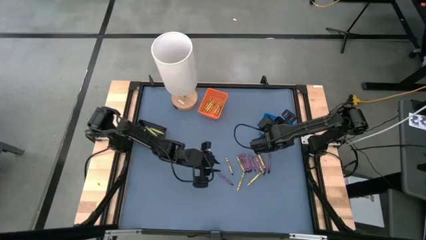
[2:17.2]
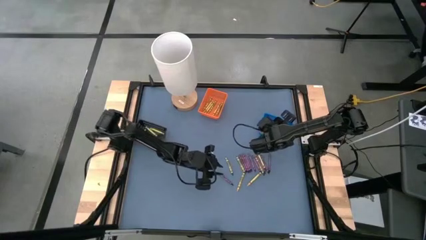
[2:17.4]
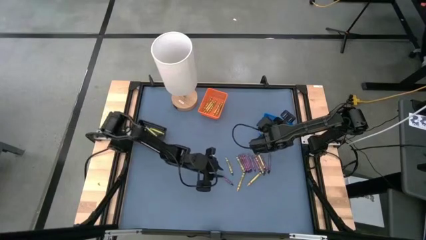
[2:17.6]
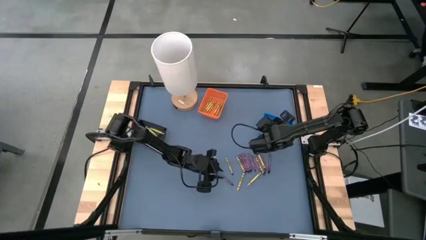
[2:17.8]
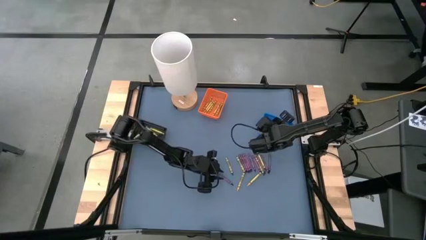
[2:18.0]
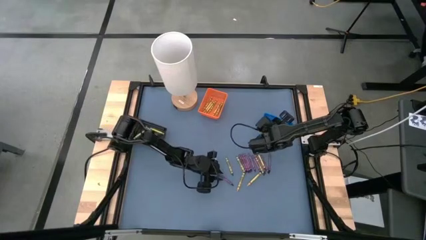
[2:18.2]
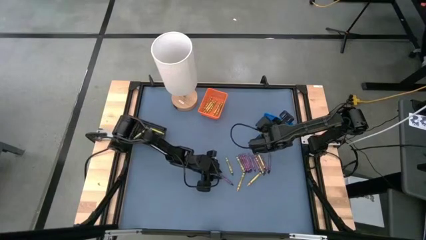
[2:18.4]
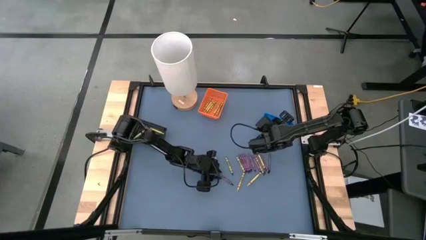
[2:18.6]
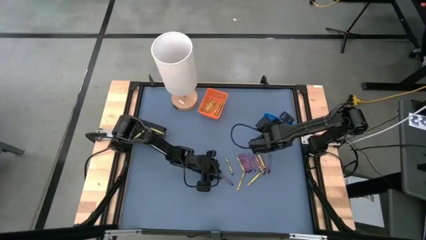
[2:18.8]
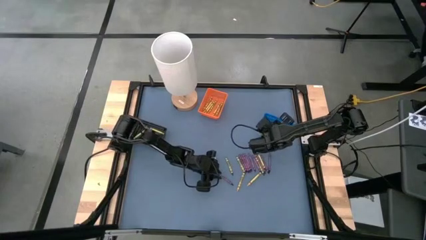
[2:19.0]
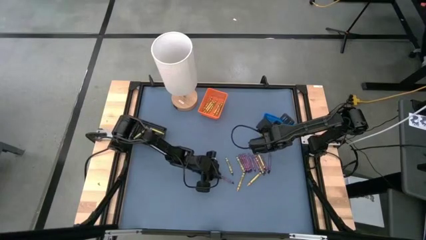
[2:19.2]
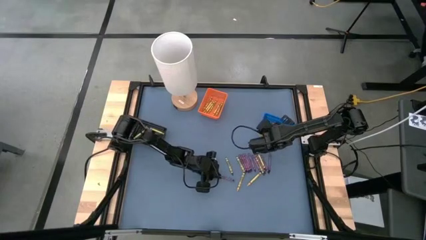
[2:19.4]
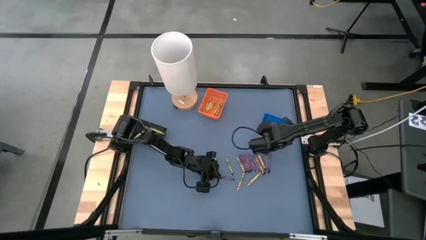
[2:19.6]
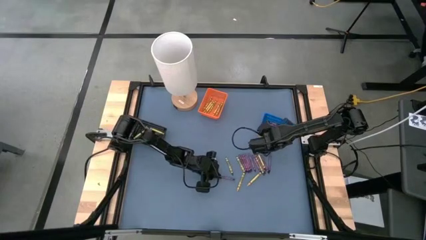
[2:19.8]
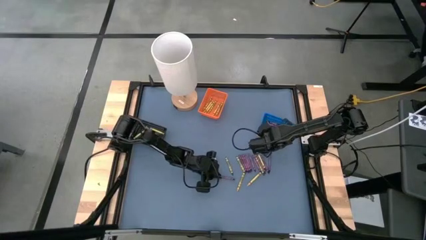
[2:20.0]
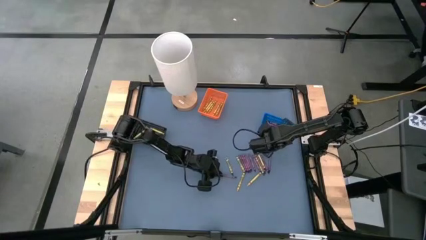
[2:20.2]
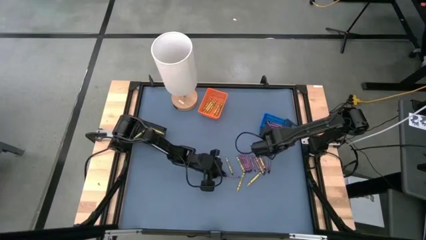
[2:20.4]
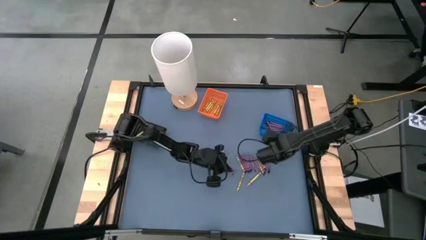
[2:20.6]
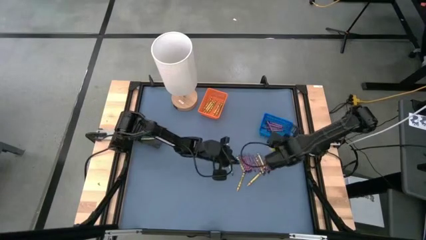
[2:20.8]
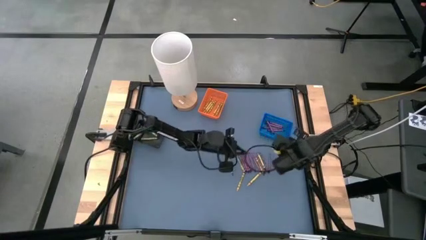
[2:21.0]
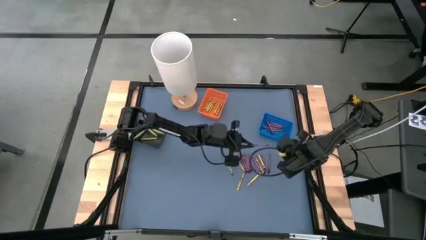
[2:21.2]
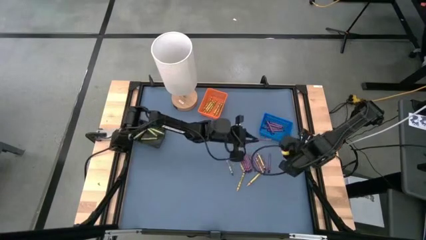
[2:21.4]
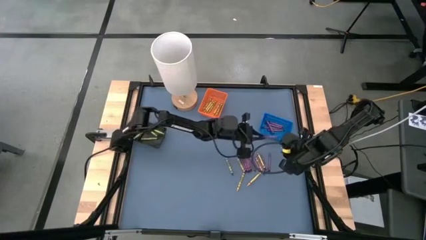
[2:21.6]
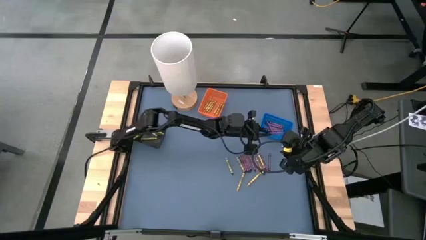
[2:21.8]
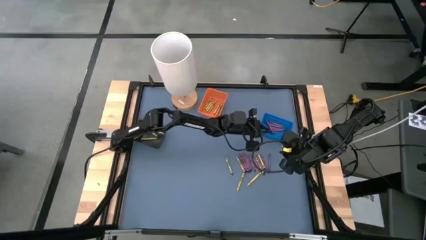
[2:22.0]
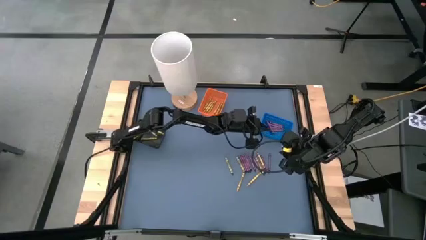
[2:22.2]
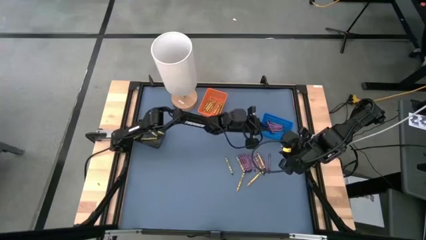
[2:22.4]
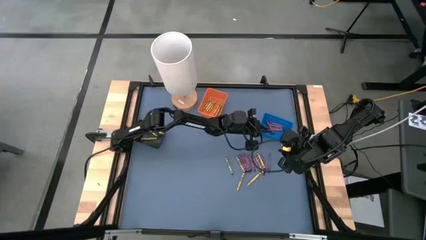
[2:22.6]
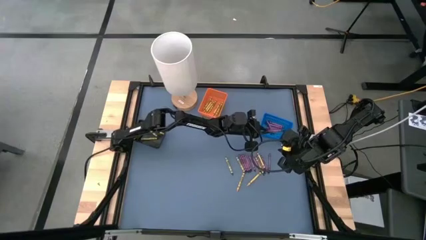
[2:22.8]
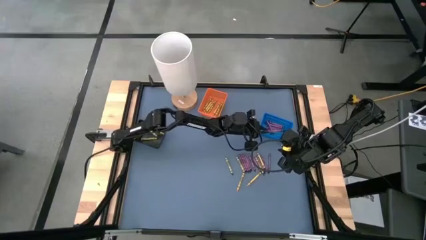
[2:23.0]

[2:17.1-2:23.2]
Task: Sort crayons
Put the violet crayon into the blue basket

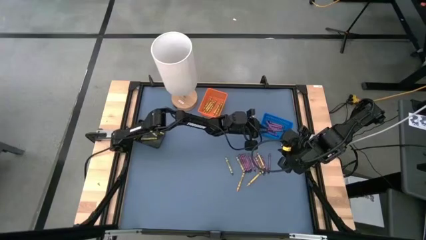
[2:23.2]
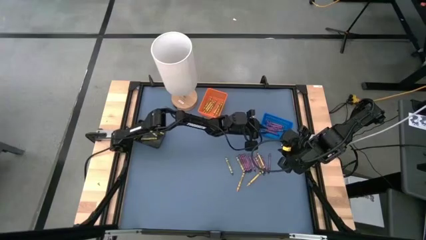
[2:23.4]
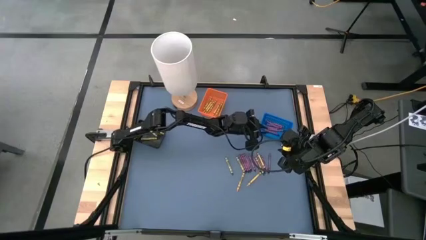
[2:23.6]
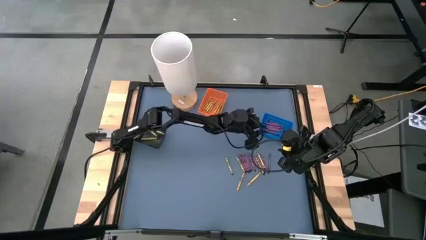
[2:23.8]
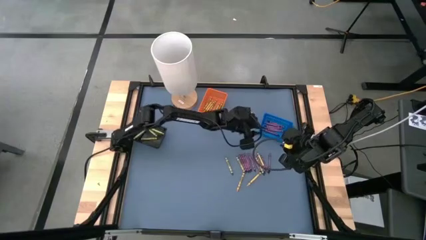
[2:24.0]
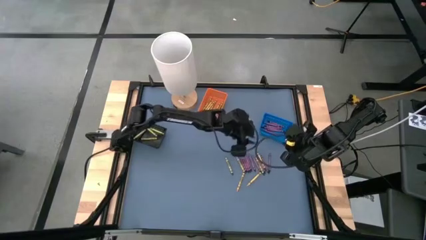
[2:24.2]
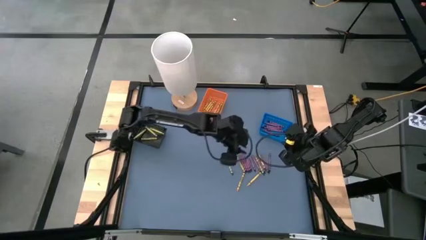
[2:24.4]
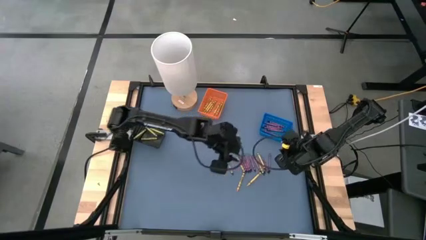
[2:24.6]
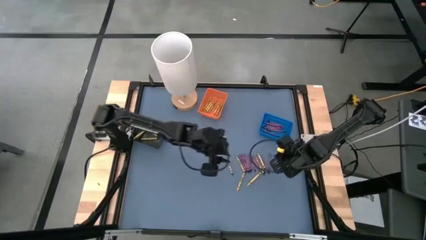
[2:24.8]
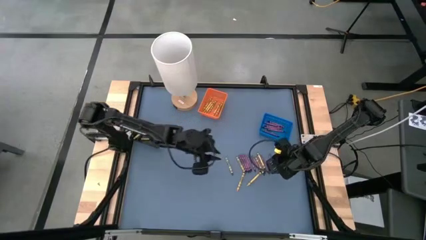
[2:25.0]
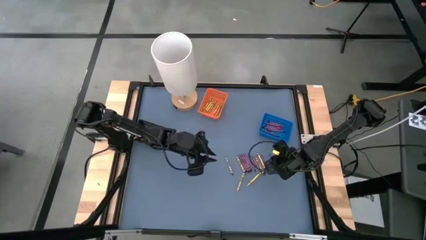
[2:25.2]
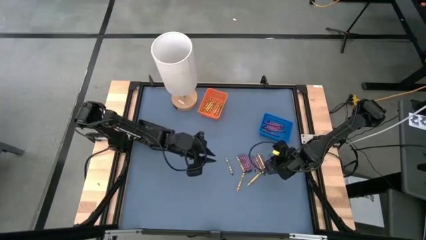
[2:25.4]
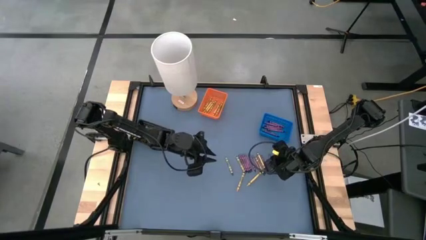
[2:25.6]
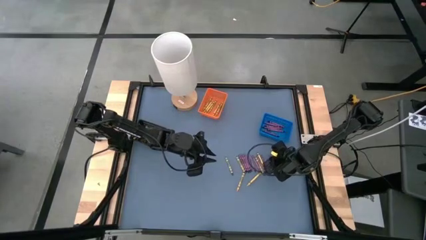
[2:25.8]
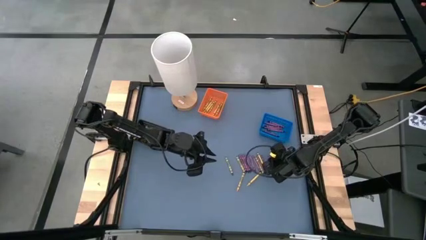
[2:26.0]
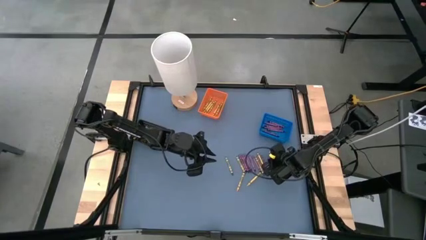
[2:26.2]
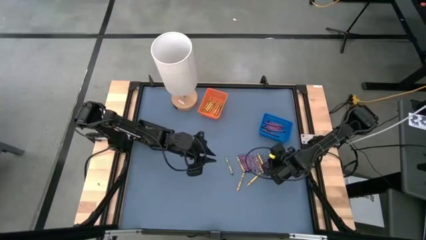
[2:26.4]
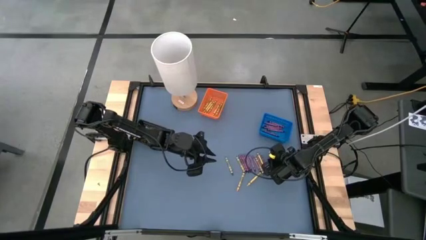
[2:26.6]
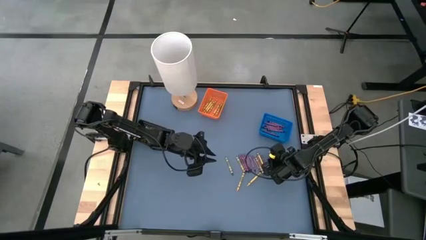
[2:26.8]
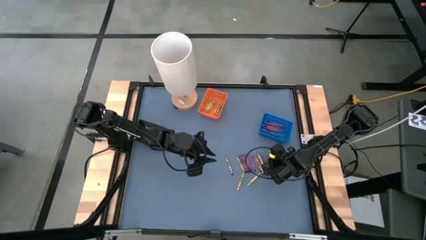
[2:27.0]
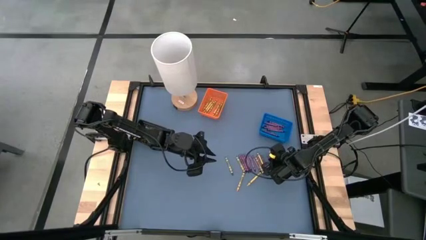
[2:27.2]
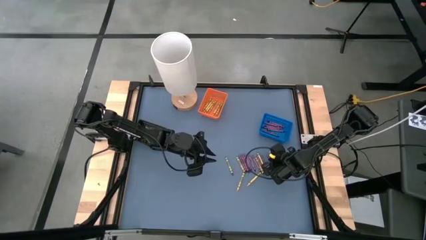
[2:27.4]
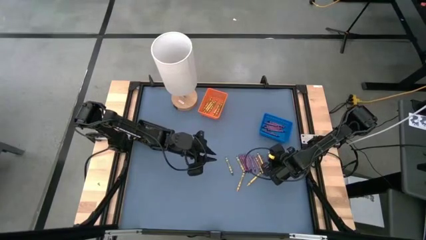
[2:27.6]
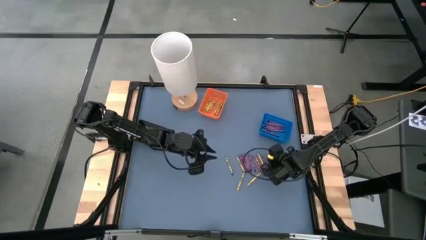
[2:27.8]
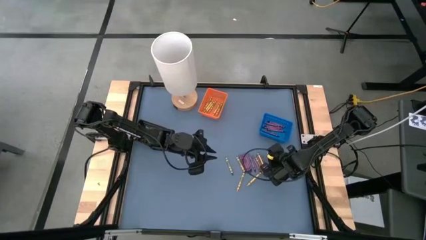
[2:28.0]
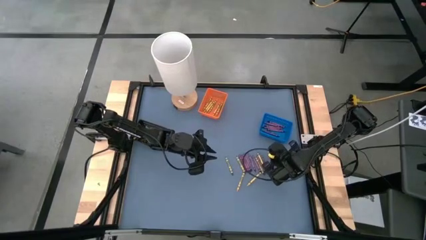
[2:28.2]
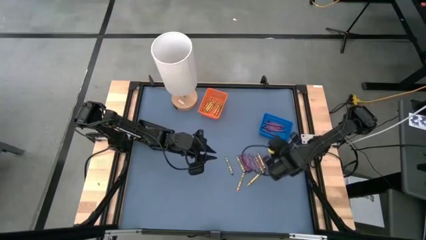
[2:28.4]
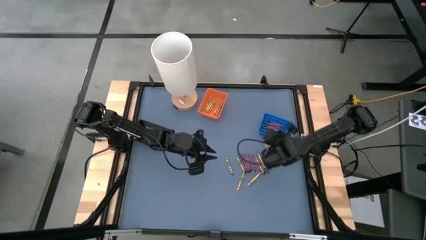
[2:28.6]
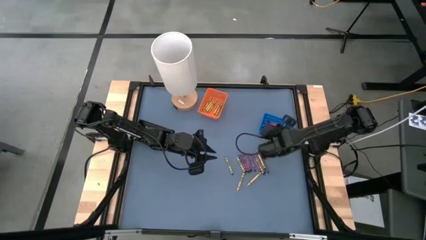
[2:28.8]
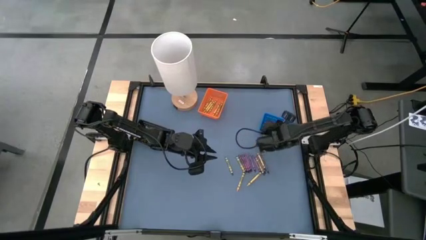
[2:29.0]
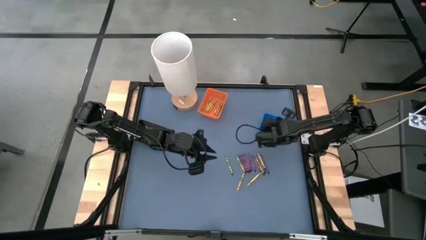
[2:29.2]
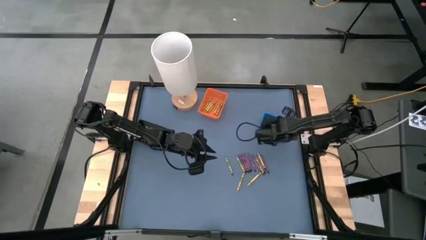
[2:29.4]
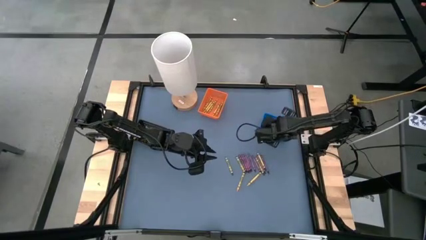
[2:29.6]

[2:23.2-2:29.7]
Put the violet crayon into the blue basket

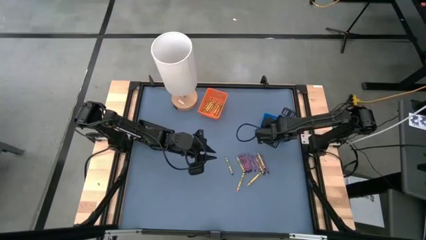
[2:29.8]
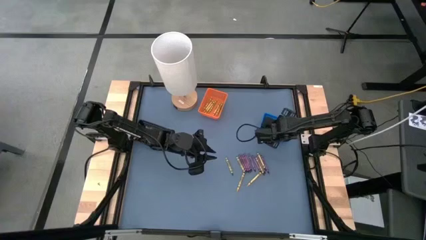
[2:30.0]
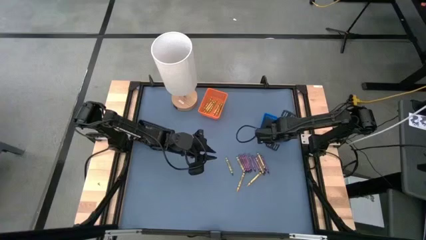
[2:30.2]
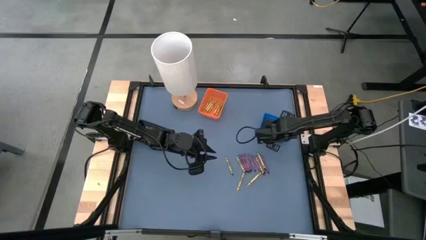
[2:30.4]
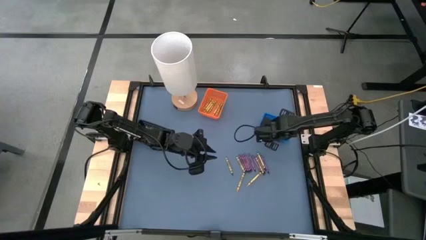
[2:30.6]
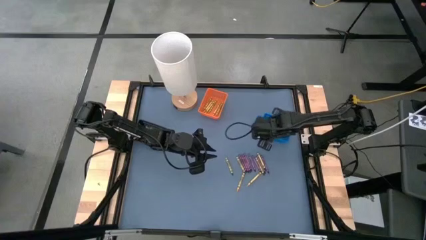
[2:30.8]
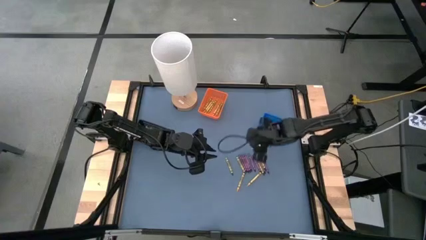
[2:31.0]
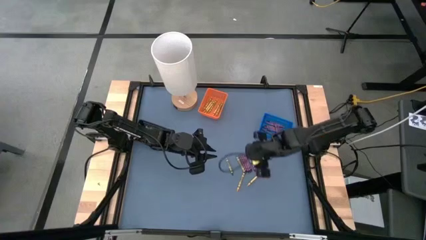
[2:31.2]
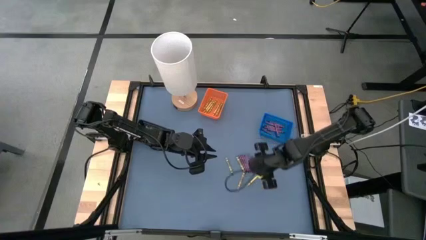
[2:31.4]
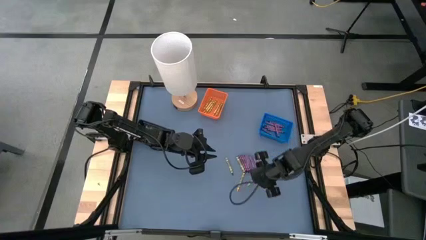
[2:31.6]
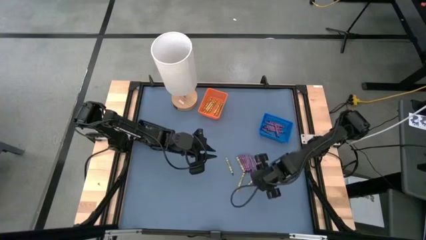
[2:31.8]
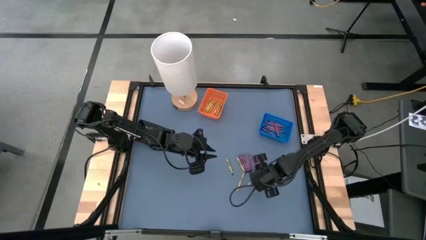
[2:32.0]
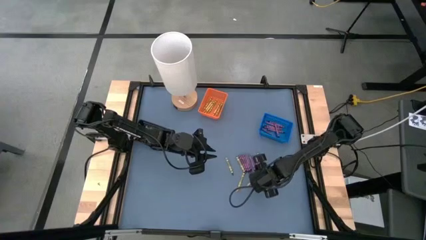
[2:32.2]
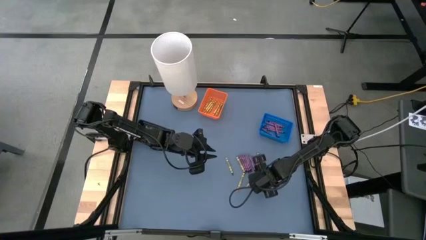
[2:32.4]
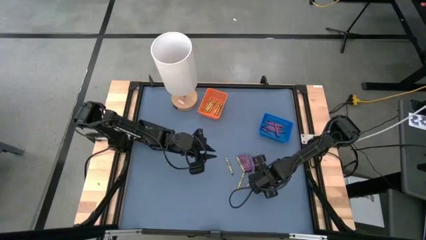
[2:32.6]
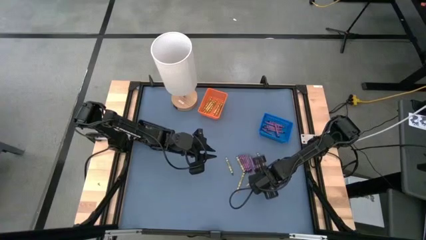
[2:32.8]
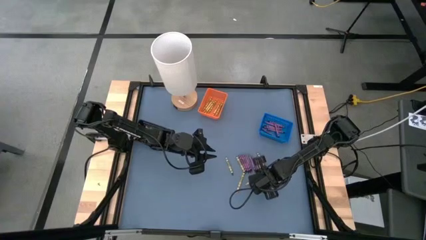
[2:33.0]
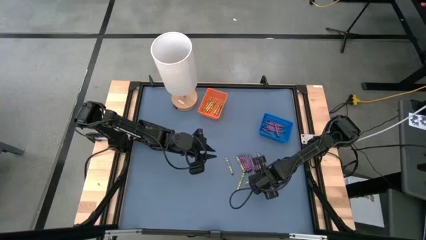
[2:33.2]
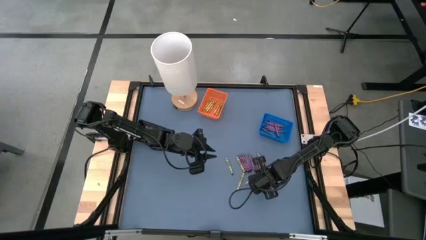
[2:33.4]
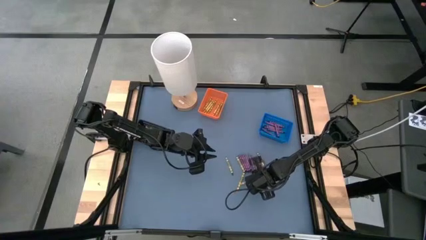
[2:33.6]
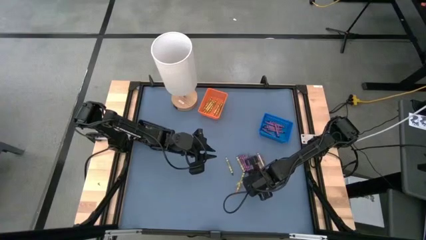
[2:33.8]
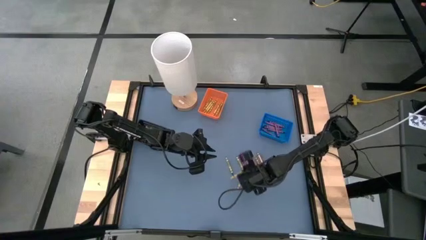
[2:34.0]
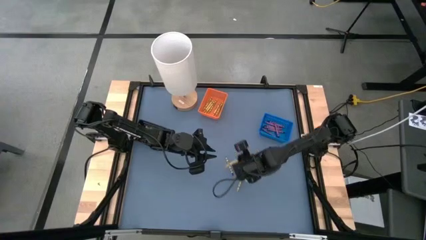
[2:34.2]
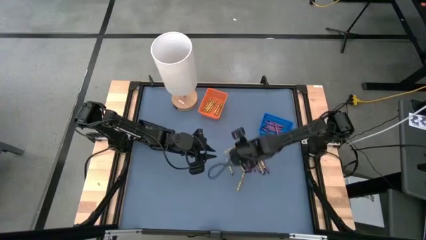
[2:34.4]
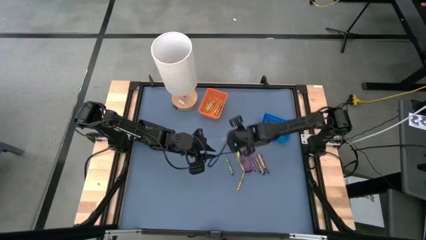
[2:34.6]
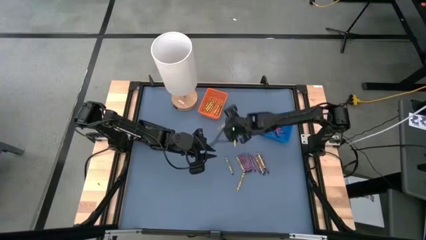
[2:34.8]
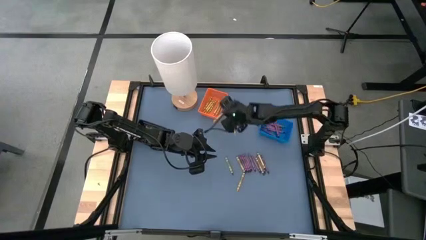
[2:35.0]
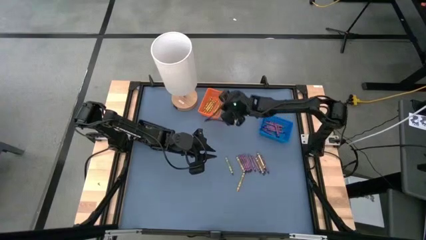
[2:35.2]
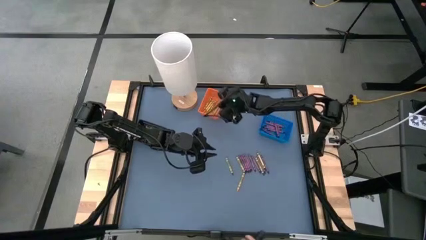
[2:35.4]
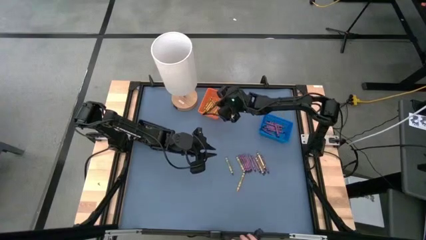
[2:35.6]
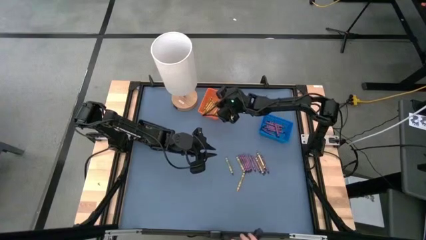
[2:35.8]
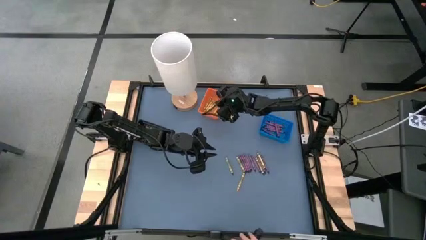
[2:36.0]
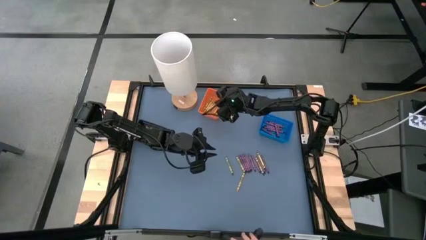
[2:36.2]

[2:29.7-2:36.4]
Put the yellow crayon into the orange basket
